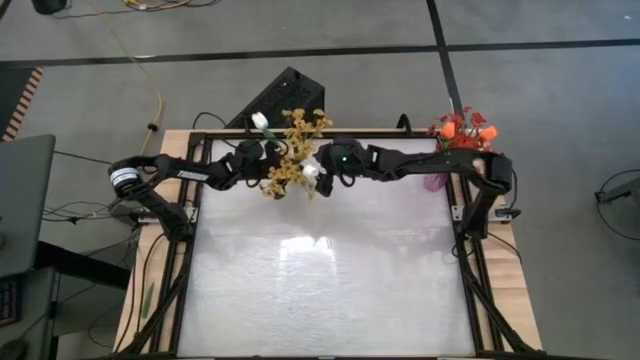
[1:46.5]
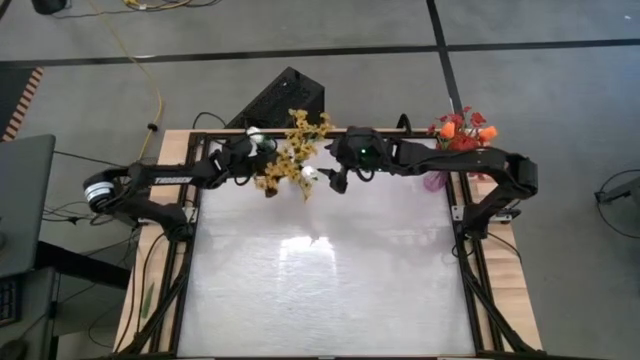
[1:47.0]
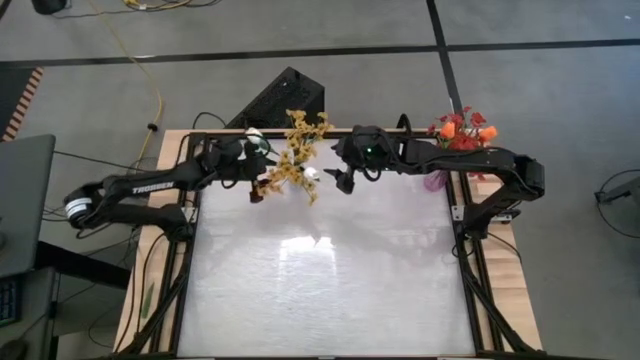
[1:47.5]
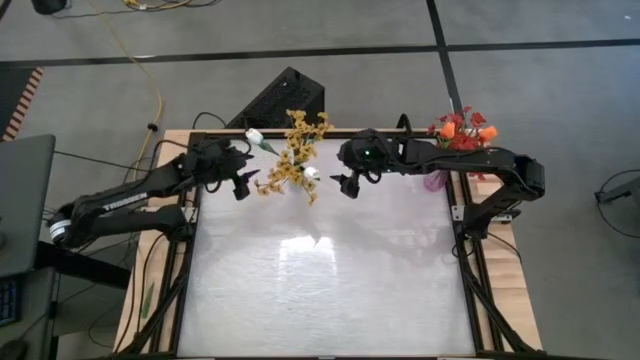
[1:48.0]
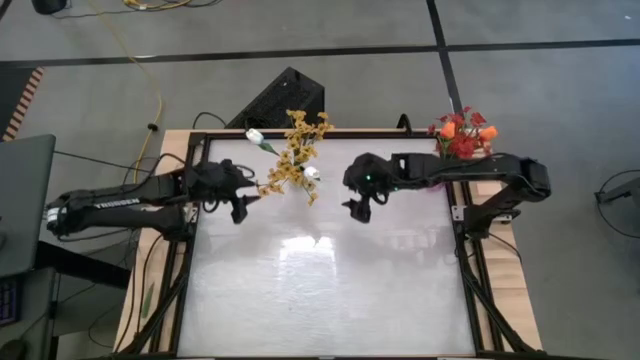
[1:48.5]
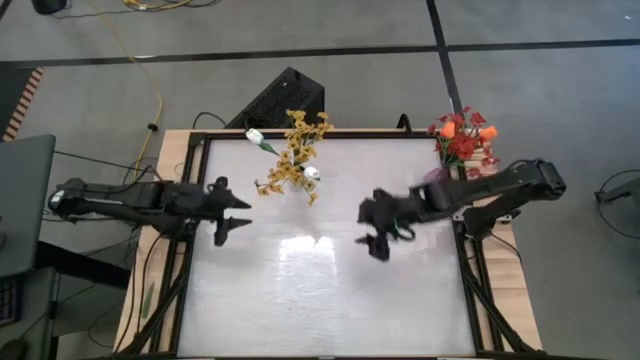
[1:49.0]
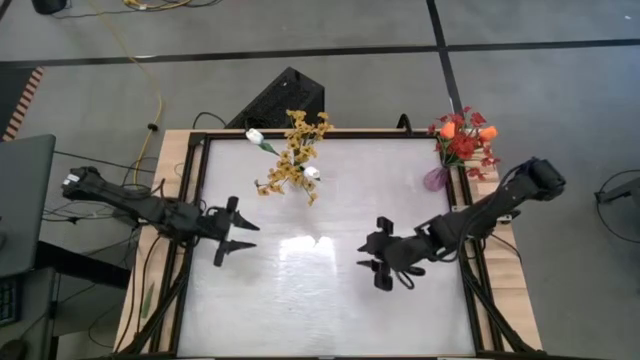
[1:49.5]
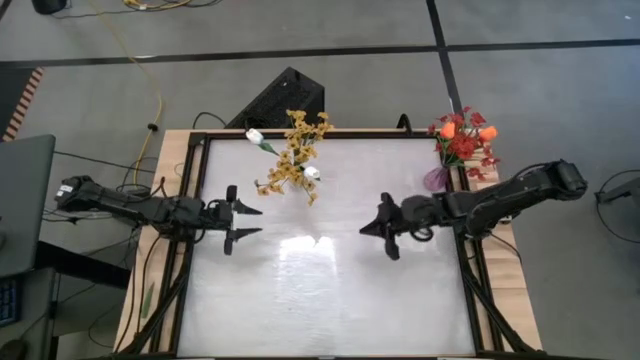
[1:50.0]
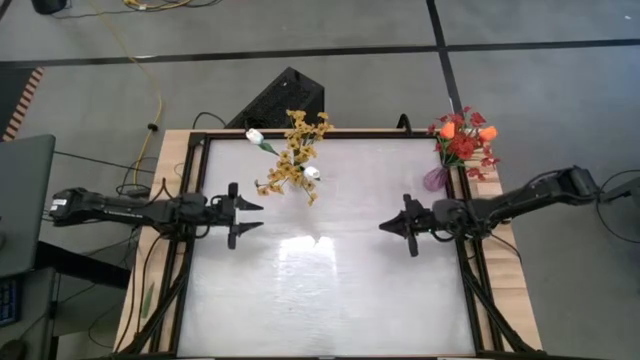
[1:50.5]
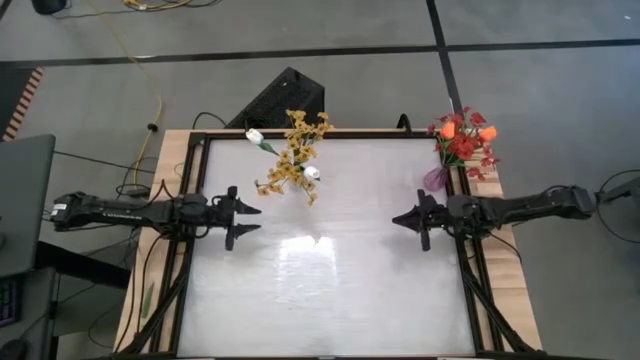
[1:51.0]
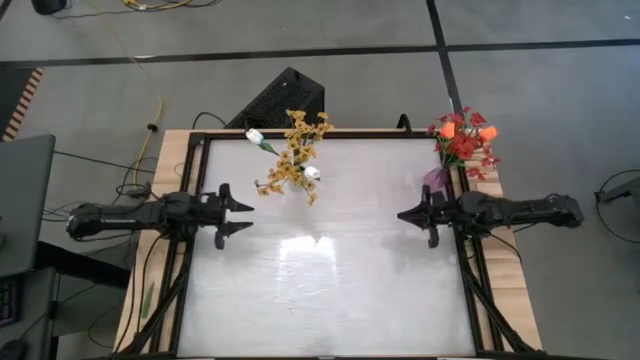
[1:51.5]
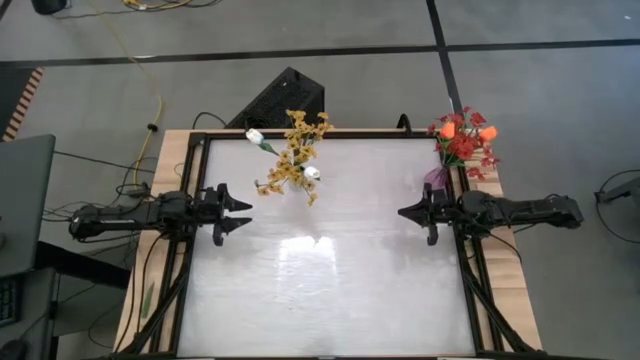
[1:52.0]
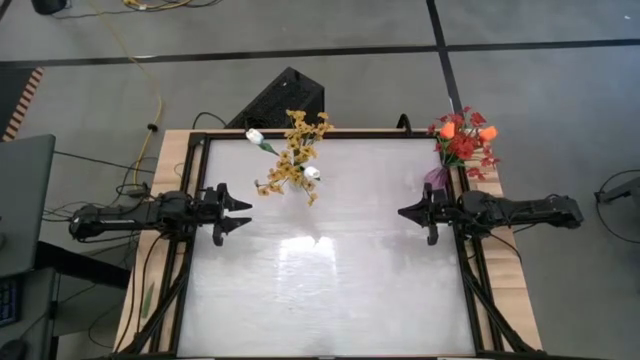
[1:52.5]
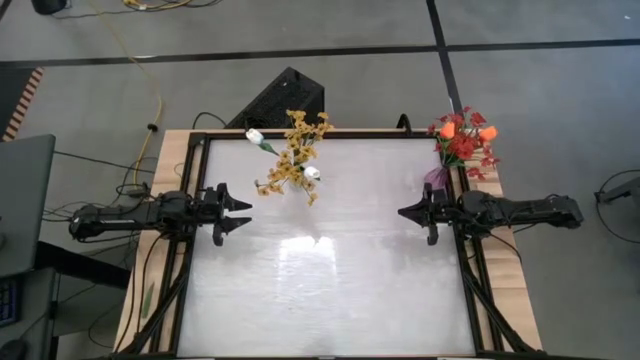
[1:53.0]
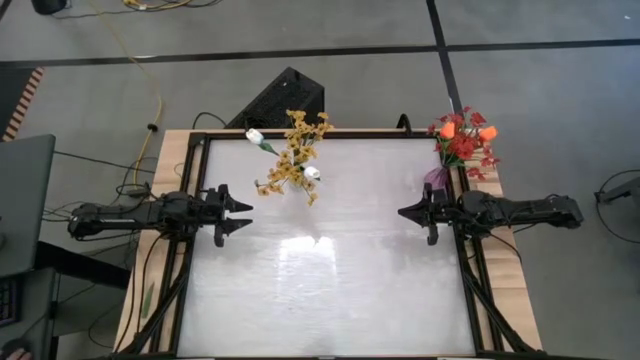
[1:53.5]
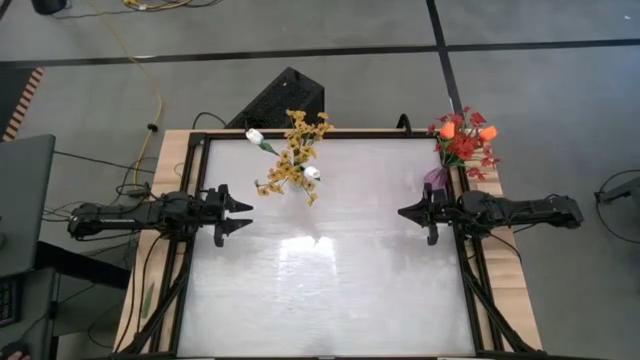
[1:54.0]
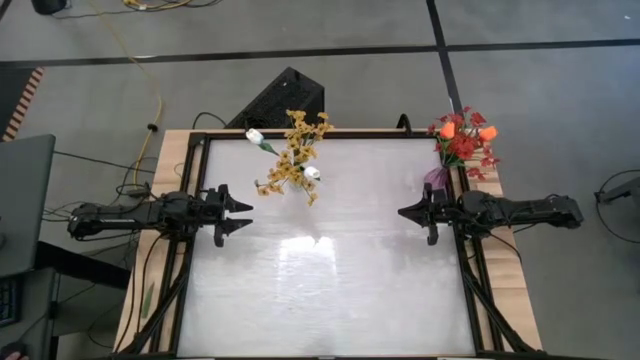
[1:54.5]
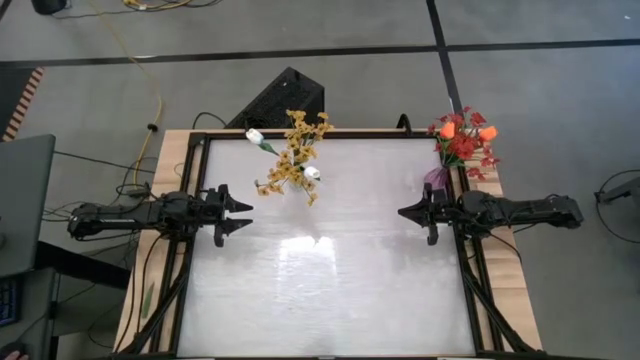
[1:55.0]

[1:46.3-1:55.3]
Task: Sort flowers into vase by color
Return to Home Position
